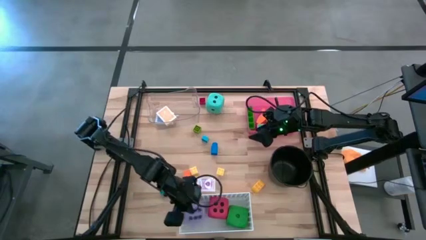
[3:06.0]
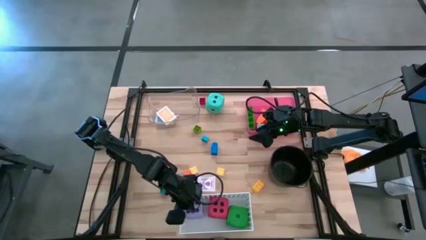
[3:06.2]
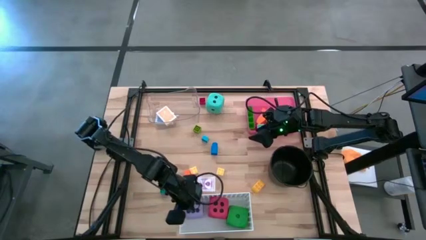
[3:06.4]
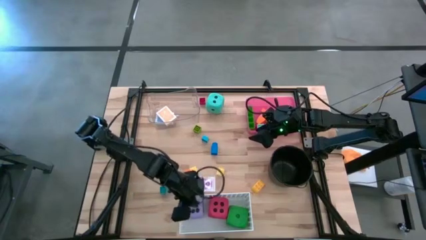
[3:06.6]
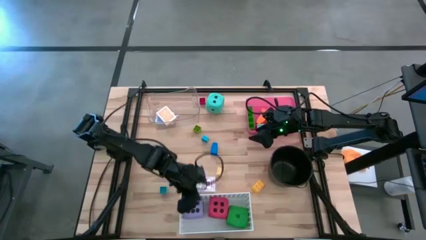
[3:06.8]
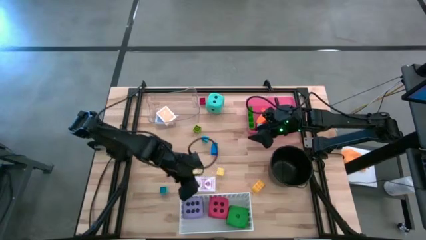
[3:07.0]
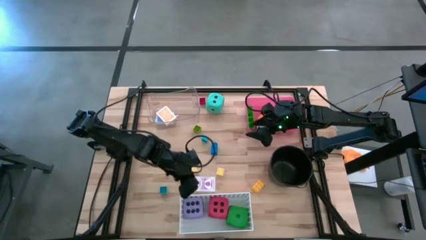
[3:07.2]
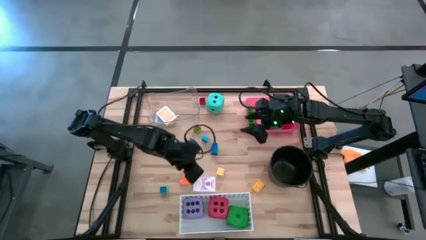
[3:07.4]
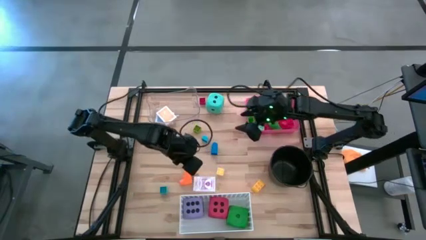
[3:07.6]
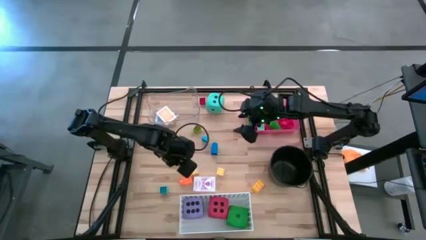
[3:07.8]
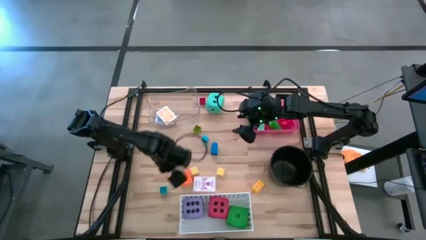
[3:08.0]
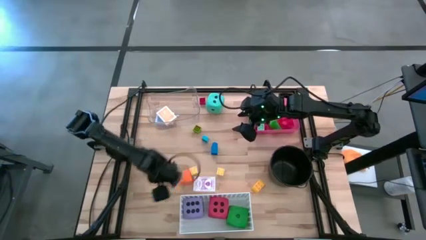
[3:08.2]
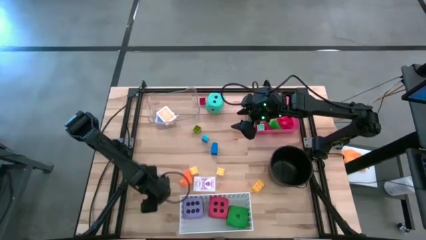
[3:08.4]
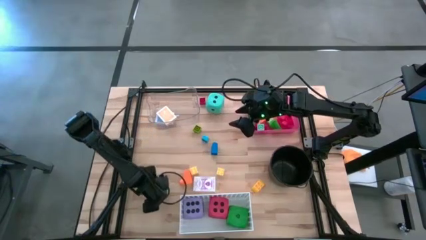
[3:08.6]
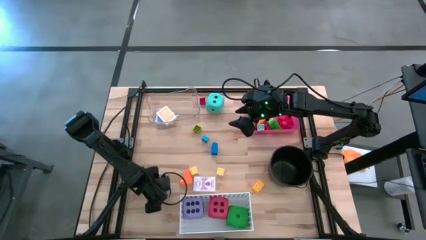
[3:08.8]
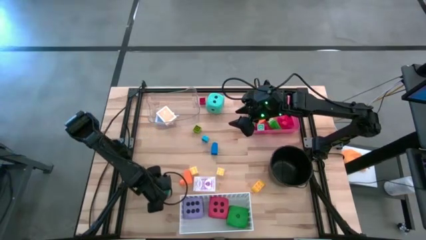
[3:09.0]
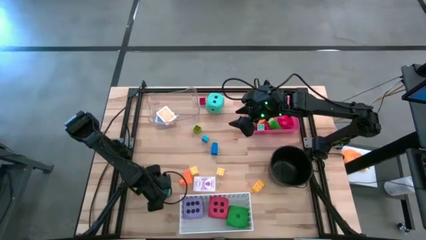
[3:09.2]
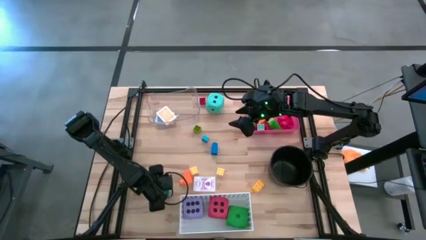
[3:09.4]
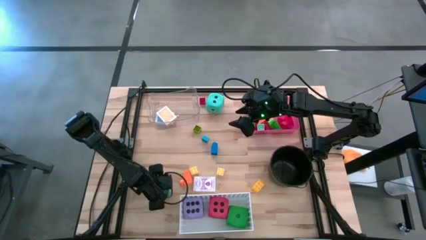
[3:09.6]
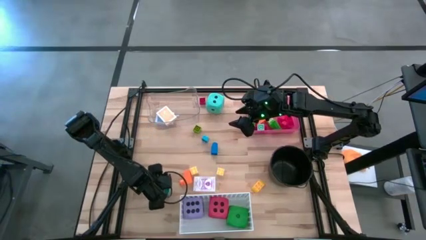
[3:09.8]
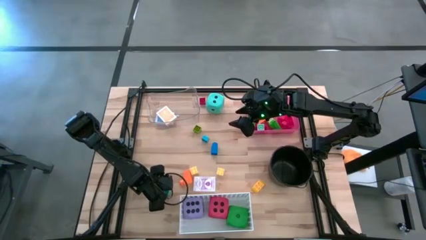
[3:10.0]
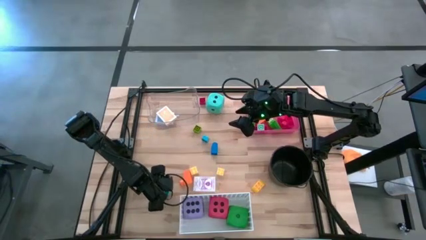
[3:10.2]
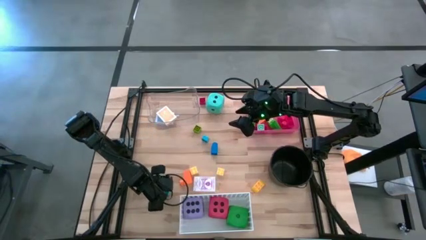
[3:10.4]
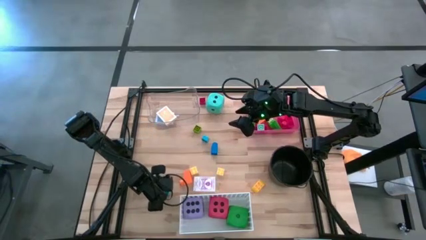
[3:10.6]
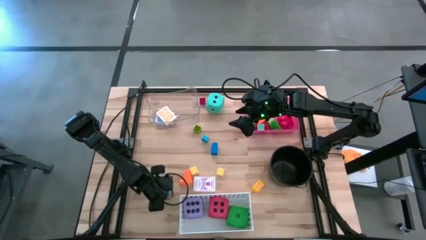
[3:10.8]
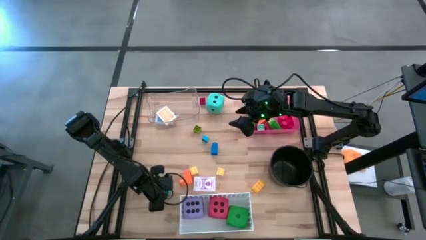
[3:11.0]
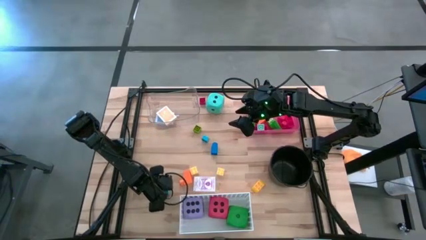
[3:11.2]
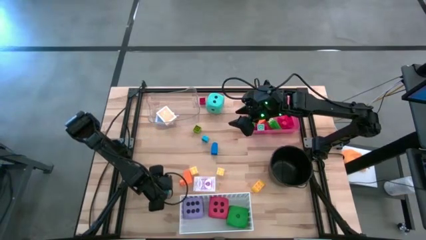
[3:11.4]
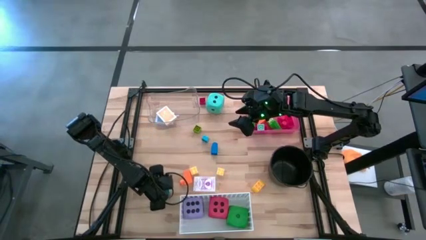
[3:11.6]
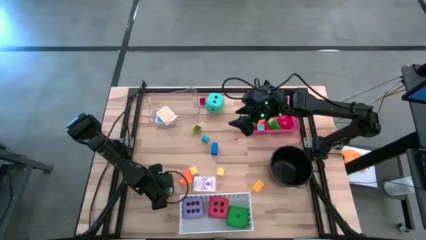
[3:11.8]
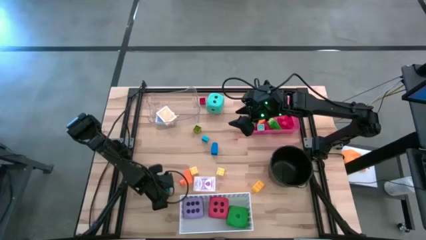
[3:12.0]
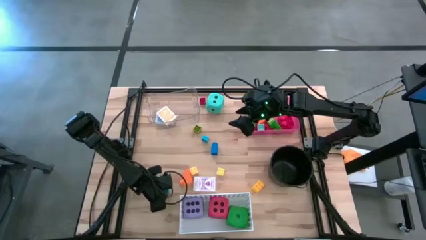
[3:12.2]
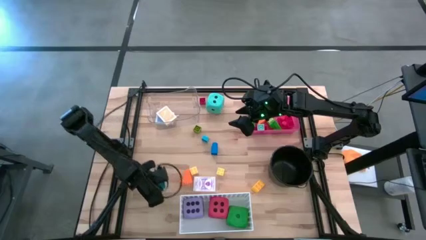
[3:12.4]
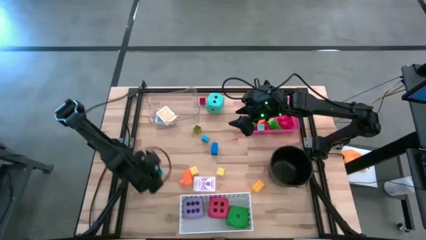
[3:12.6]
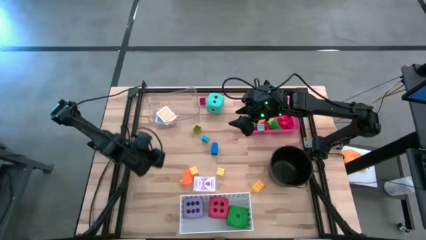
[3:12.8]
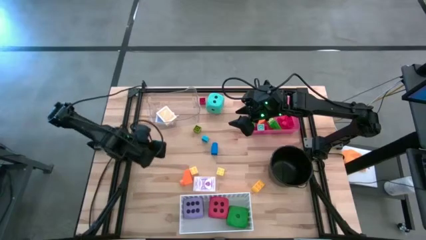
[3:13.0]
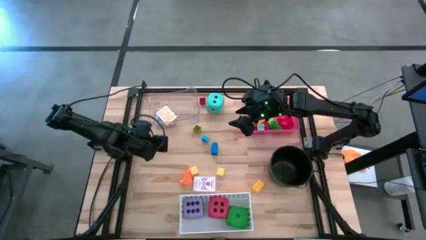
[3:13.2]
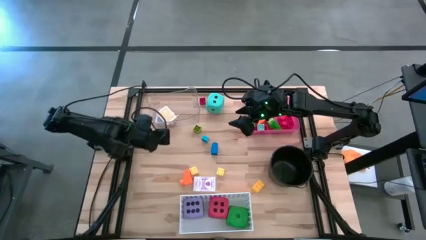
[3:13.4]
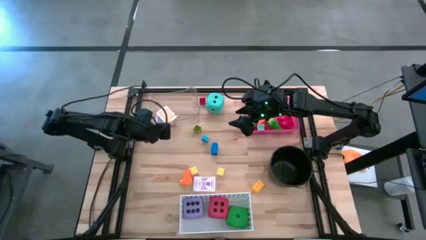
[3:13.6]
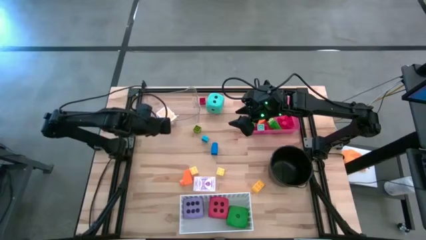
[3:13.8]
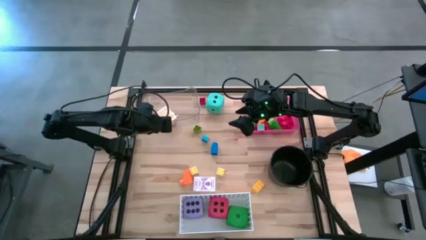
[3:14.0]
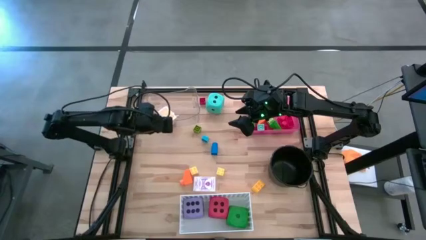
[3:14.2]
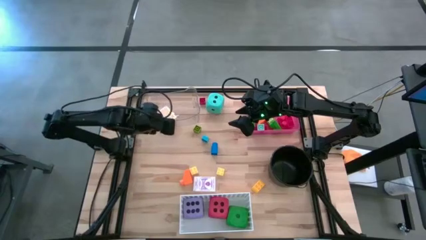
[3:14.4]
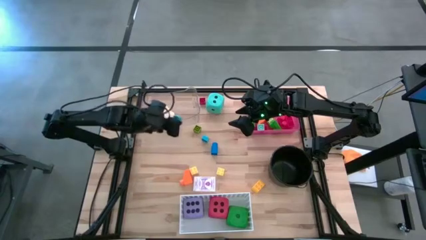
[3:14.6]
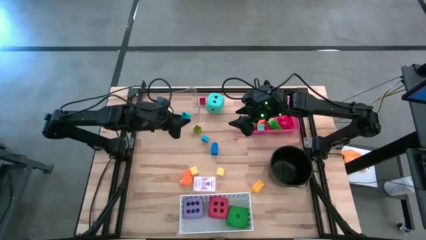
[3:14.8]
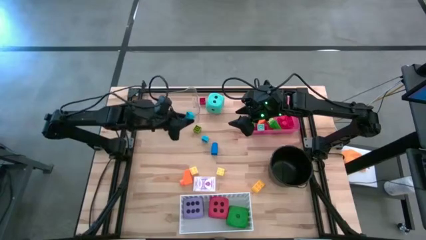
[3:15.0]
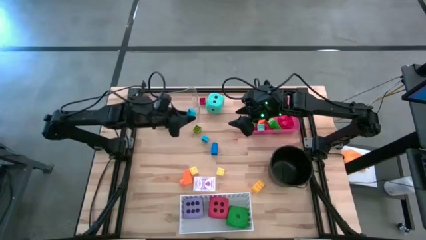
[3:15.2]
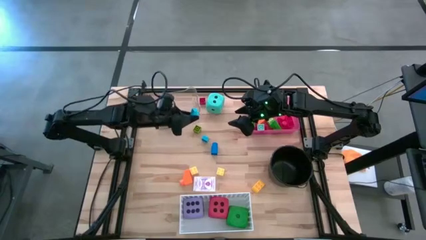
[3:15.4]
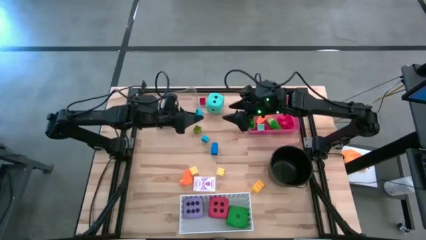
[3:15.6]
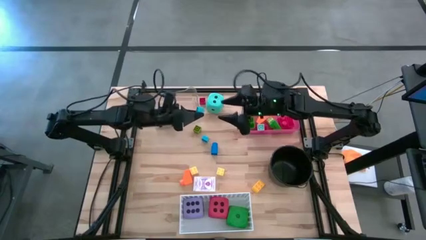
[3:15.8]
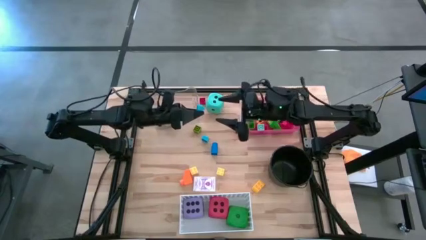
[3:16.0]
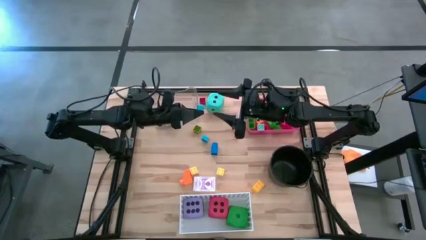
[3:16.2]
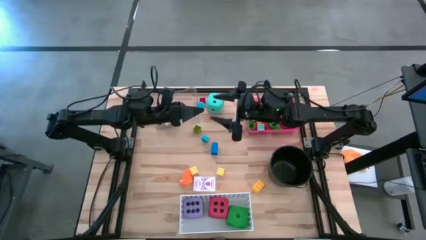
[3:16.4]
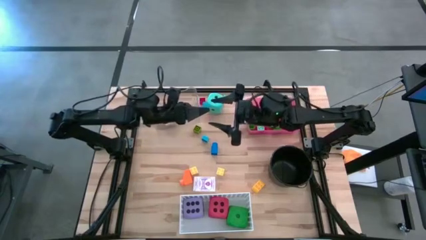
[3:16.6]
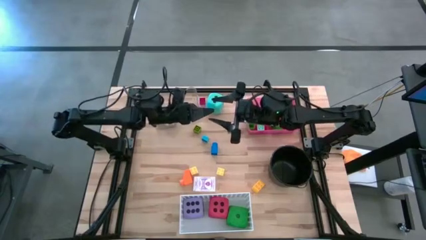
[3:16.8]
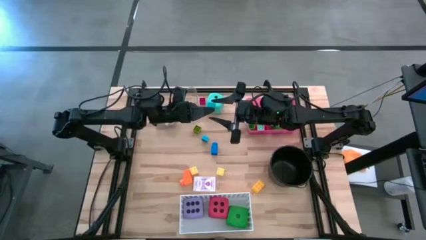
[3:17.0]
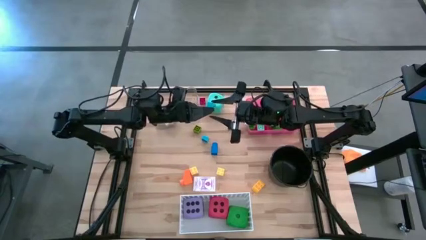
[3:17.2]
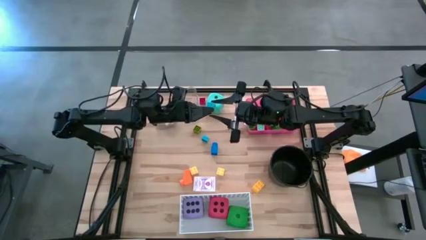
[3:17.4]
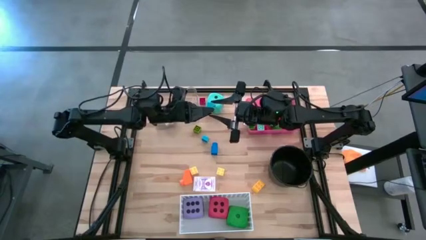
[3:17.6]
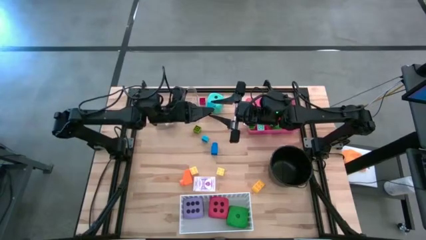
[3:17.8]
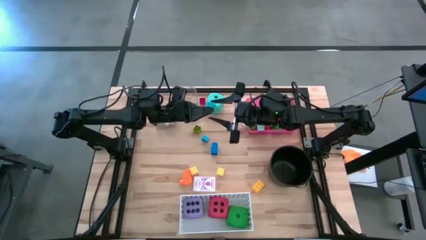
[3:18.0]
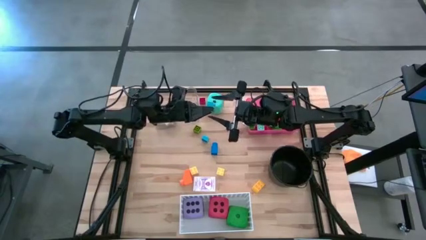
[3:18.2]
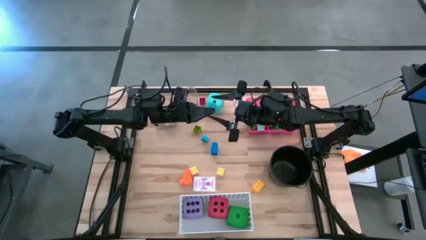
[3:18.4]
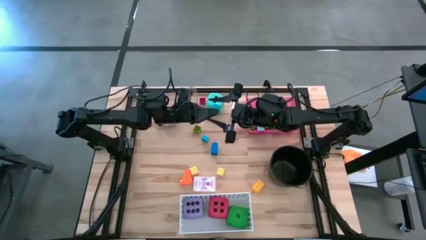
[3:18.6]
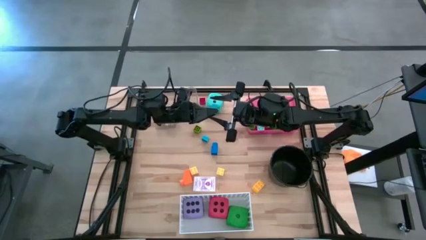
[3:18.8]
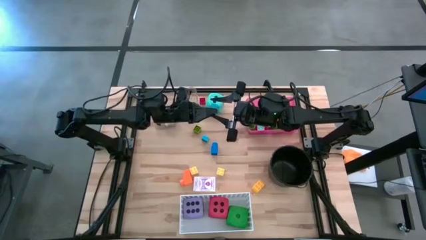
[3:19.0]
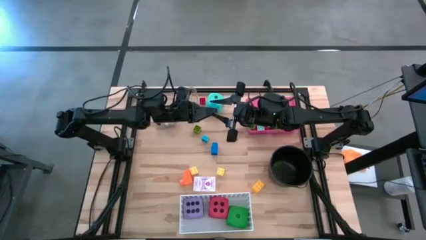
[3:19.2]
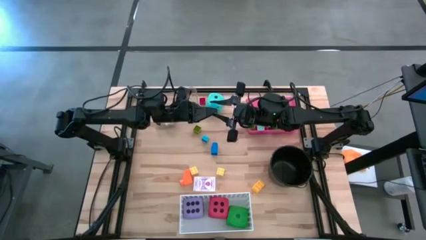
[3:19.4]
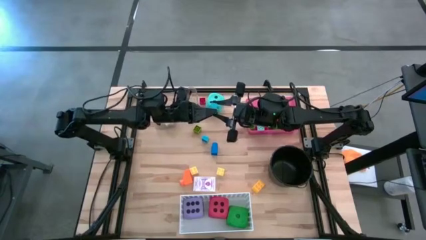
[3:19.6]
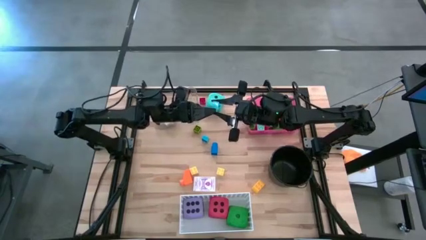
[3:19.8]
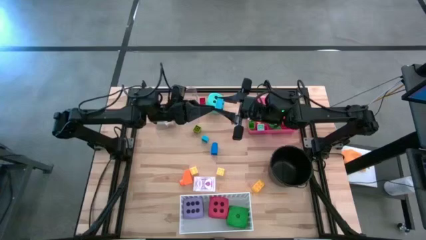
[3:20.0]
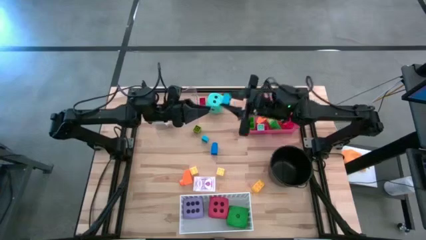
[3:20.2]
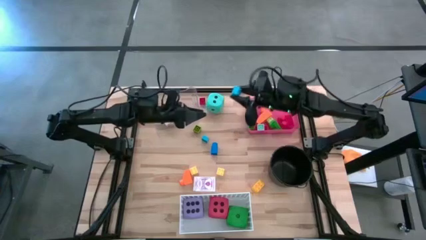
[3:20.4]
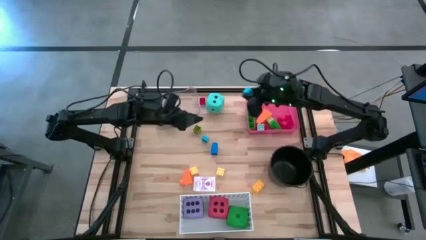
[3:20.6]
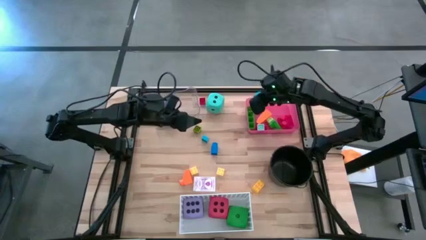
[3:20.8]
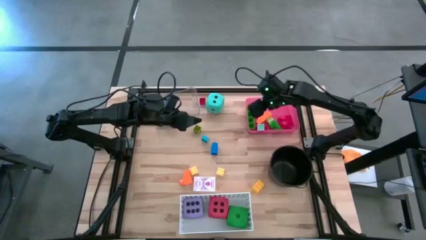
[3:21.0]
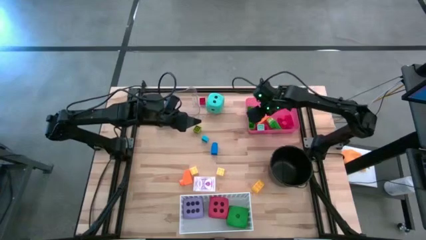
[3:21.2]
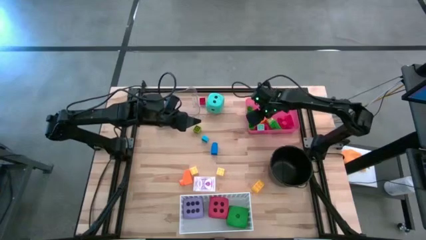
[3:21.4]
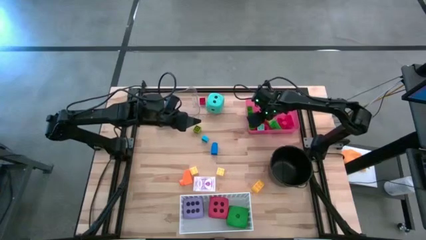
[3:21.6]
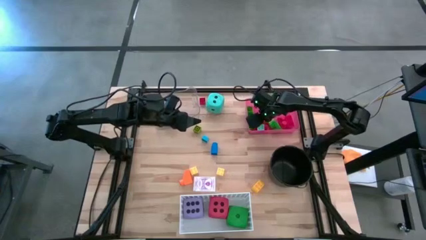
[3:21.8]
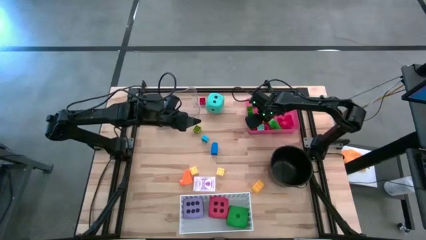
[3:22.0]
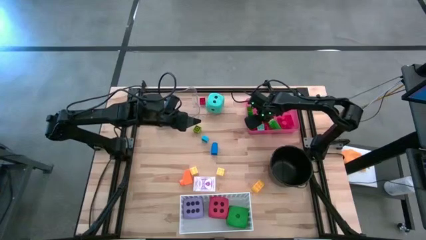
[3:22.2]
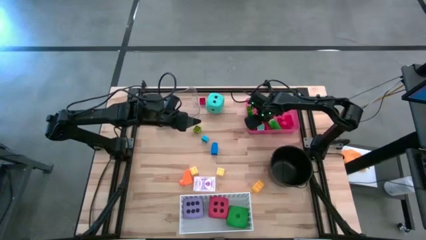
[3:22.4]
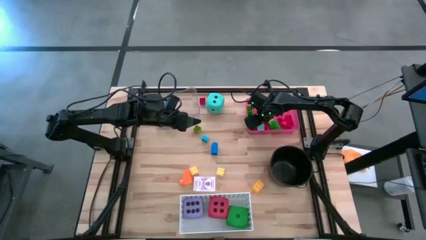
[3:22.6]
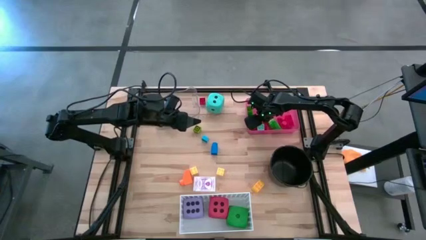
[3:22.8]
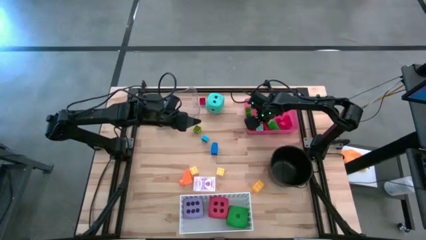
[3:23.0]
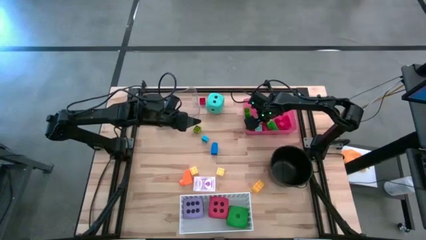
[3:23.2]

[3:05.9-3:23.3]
Task: Pick & Place Toys
Put the light blue game piece into the red bin
